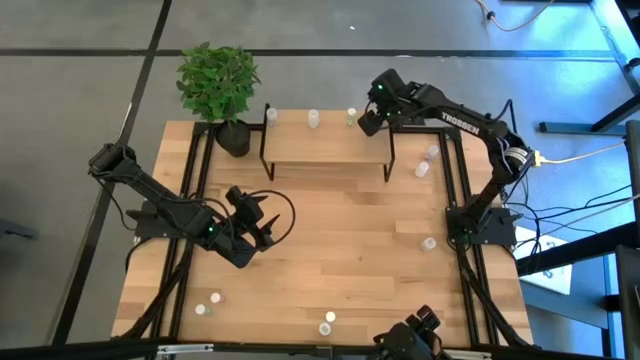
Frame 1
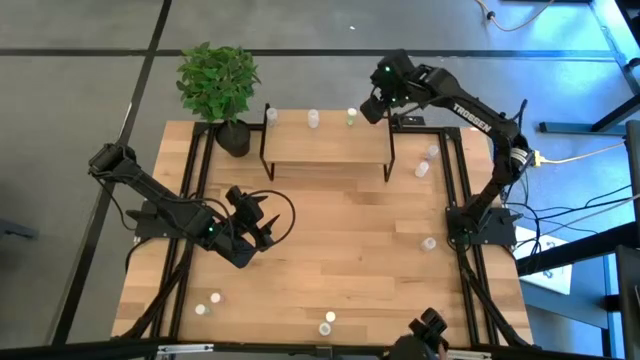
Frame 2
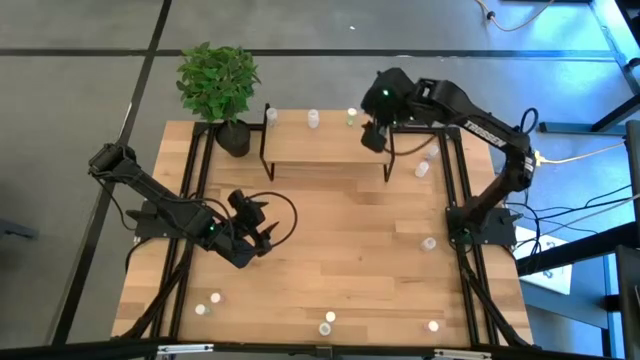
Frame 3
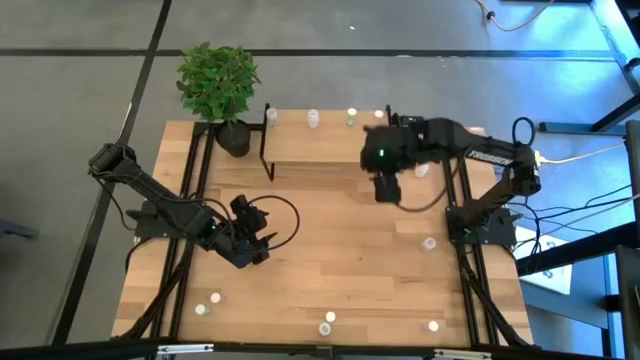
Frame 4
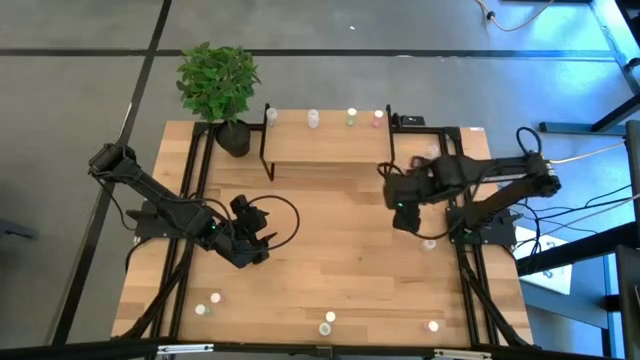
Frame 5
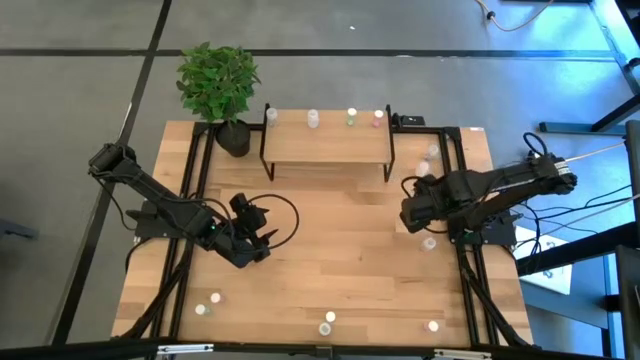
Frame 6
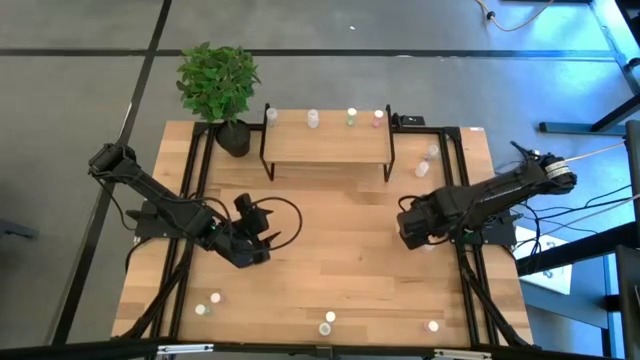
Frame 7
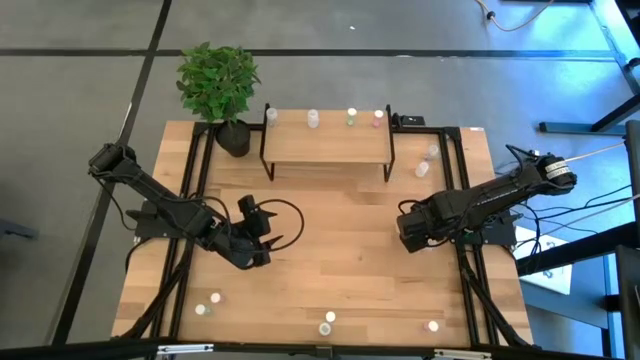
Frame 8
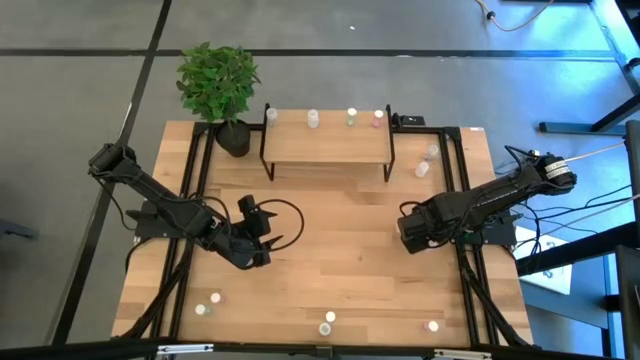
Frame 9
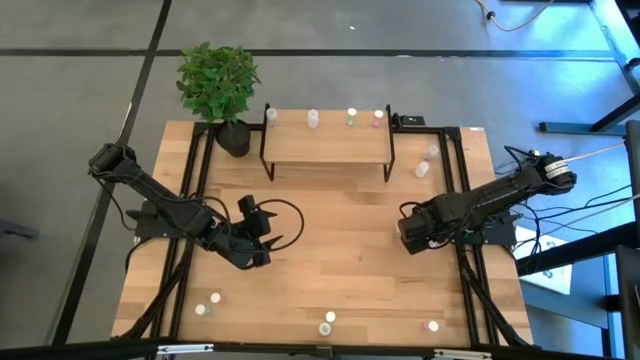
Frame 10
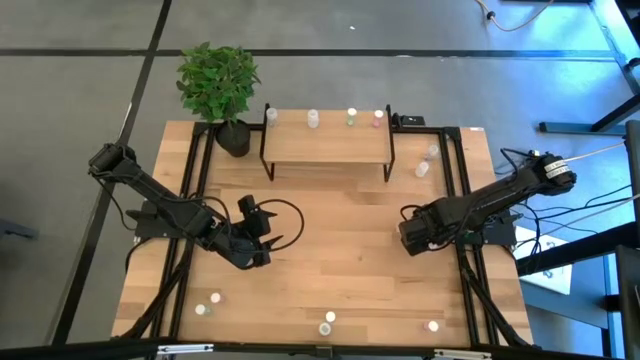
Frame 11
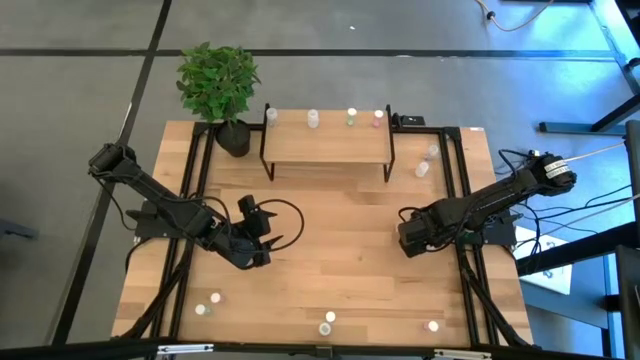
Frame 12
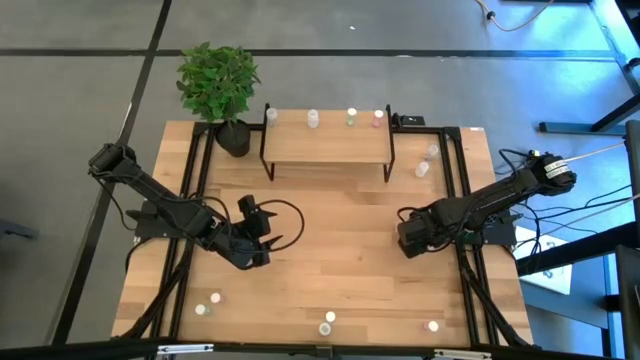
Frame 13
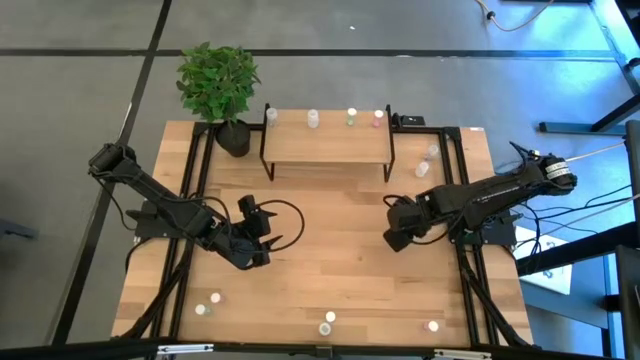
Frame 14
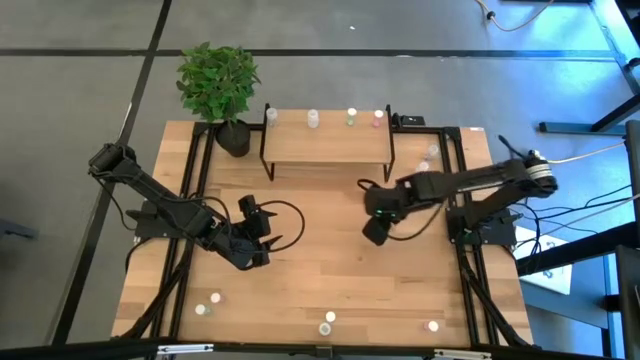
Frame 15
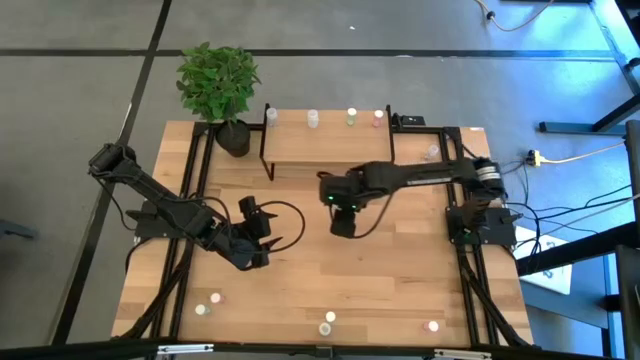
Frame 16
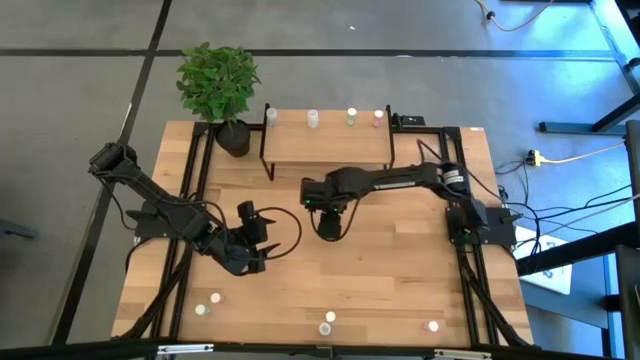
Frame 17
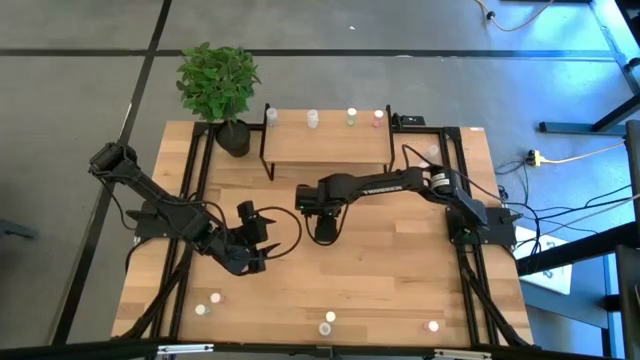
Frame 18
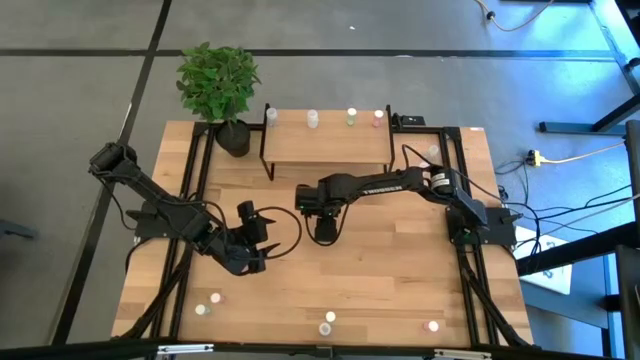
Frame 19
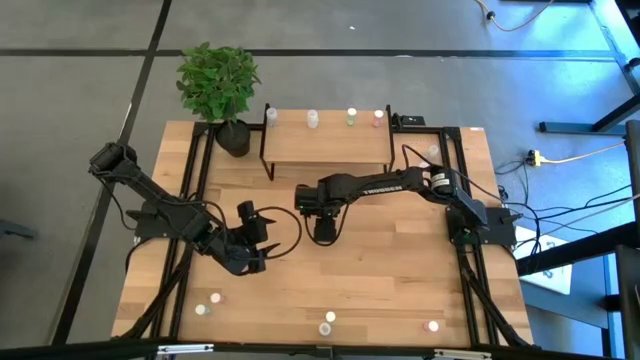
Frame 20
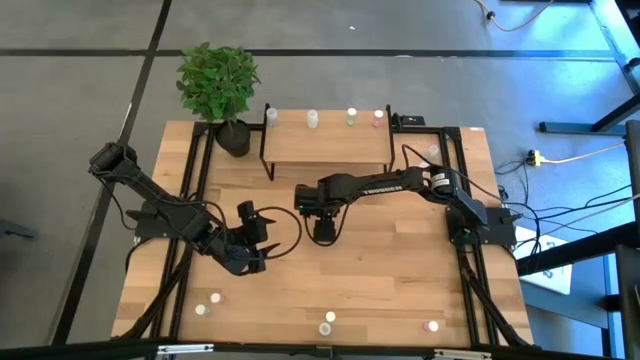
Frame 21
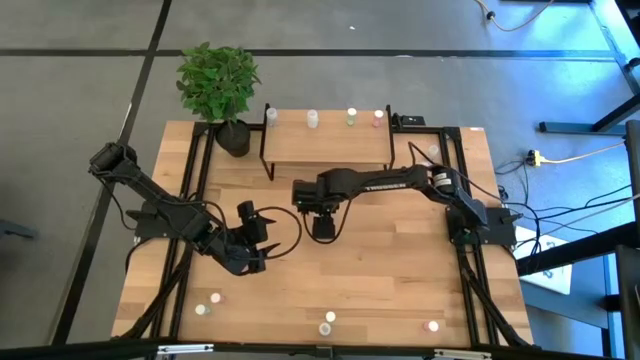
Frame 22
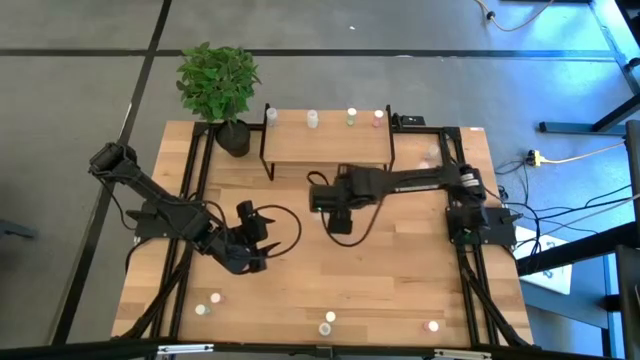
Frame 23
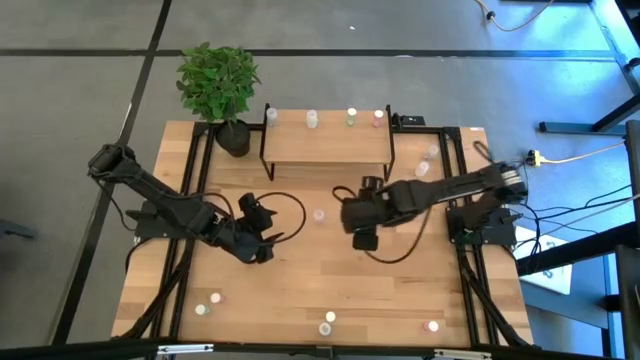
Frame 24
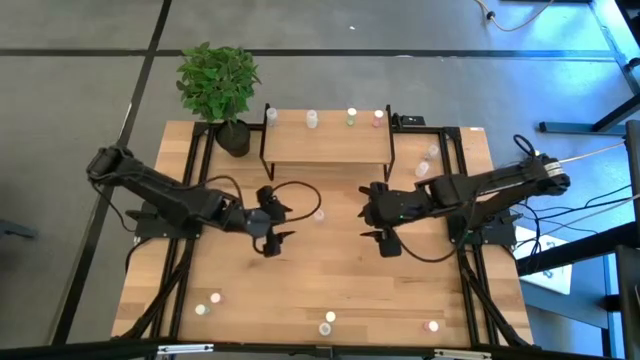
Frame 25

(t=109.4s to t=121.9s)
Task: Pick and place medicine bottles onto shelf by color
Put the middle right transparent pill bottle on the shelf aligned with the other transparent pill bottle

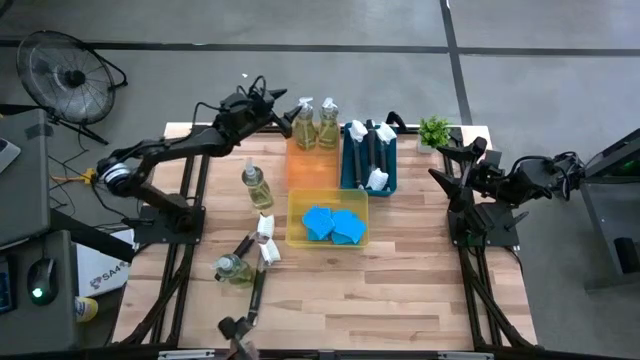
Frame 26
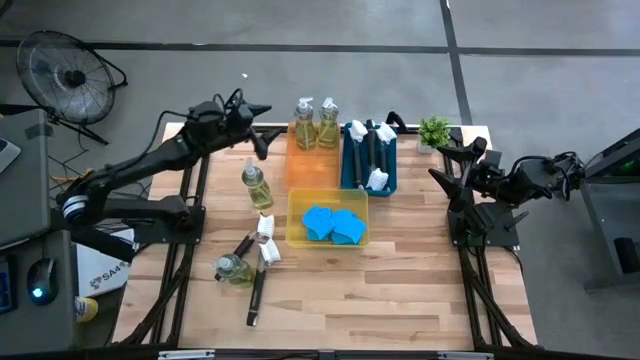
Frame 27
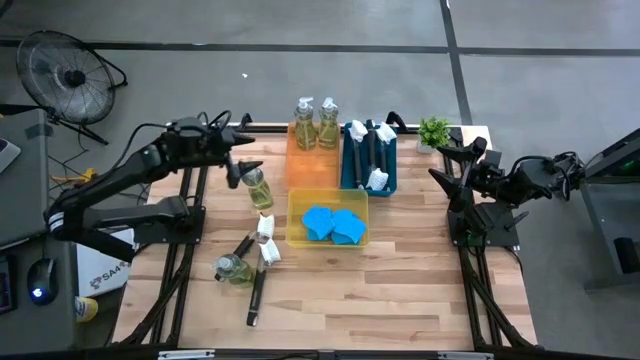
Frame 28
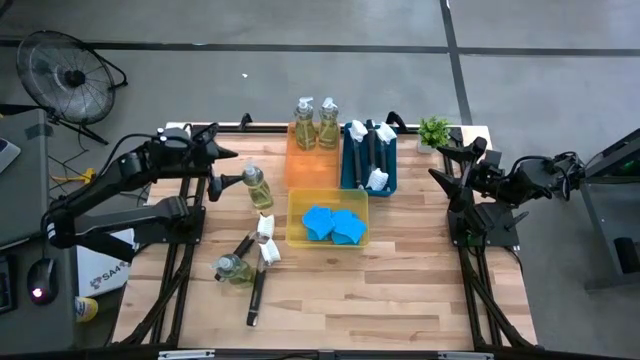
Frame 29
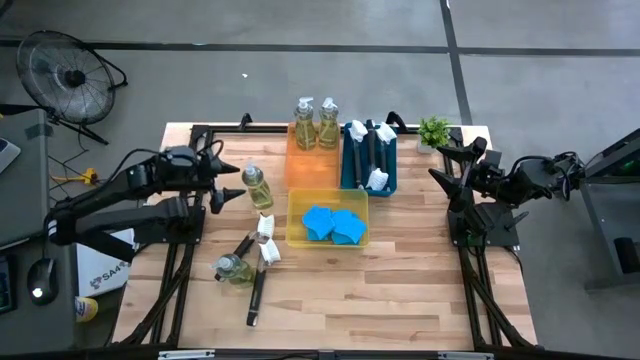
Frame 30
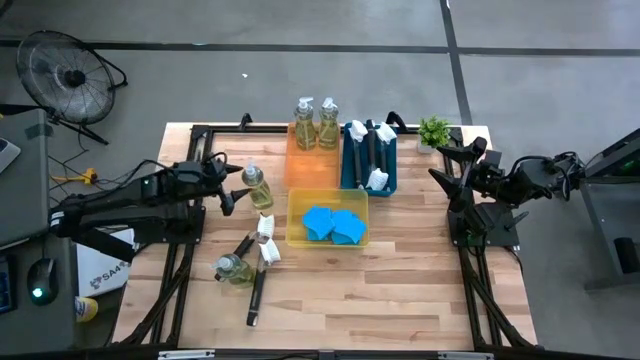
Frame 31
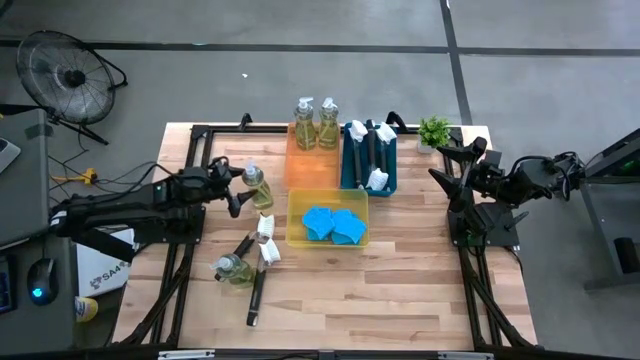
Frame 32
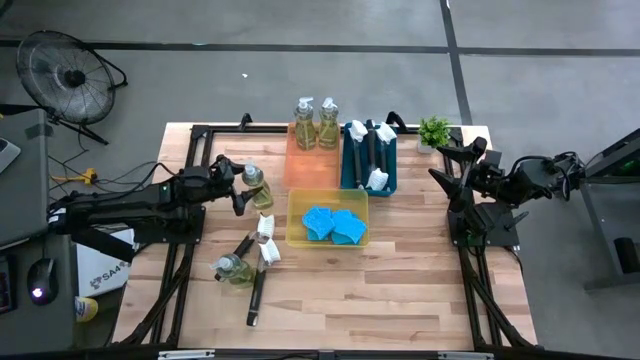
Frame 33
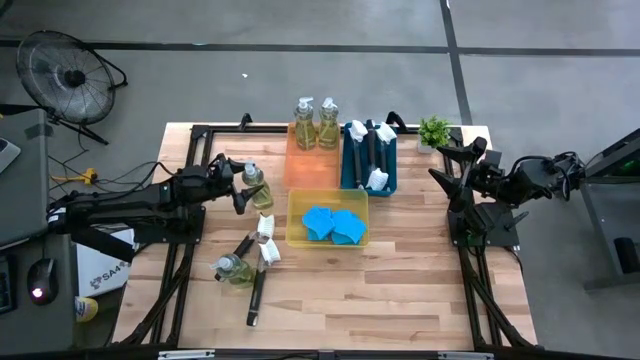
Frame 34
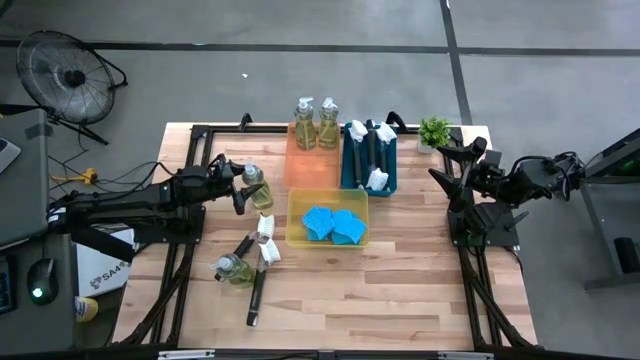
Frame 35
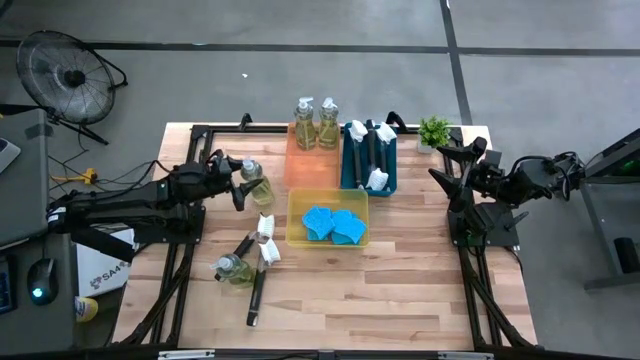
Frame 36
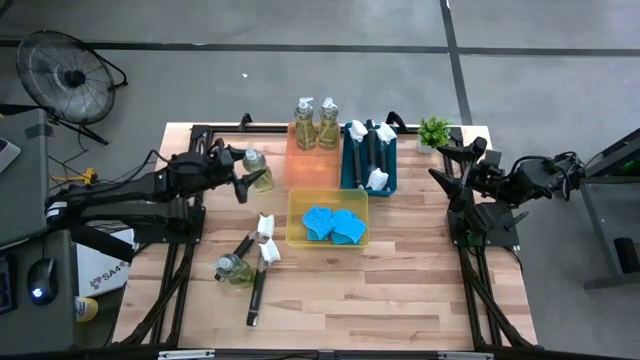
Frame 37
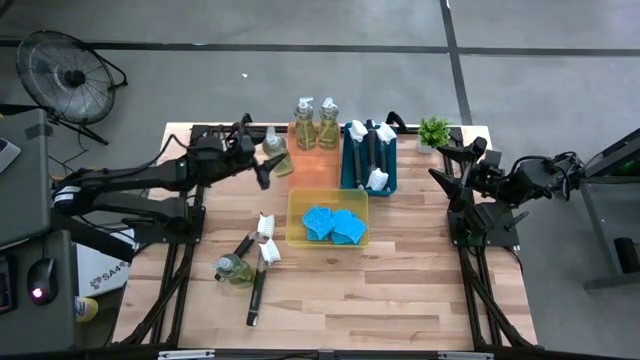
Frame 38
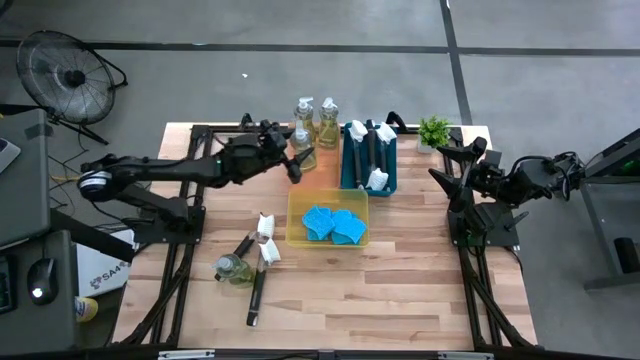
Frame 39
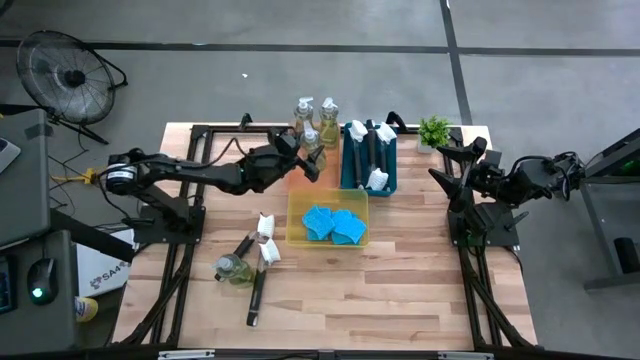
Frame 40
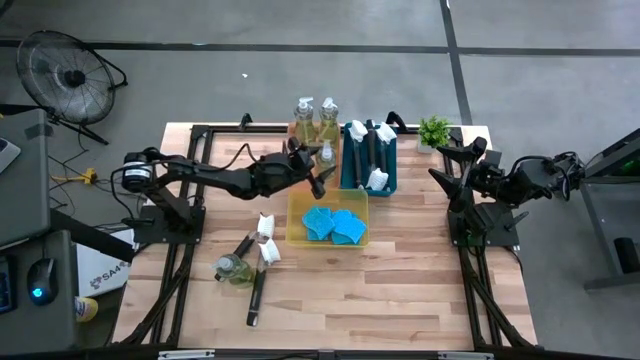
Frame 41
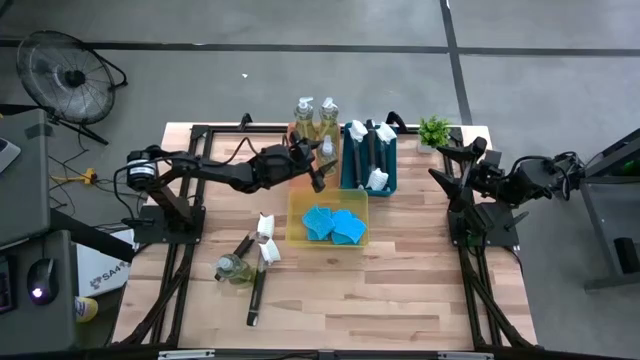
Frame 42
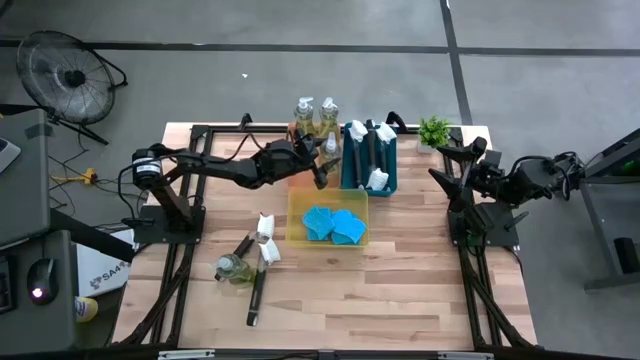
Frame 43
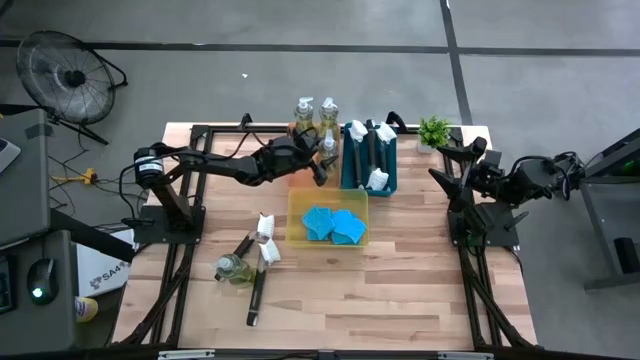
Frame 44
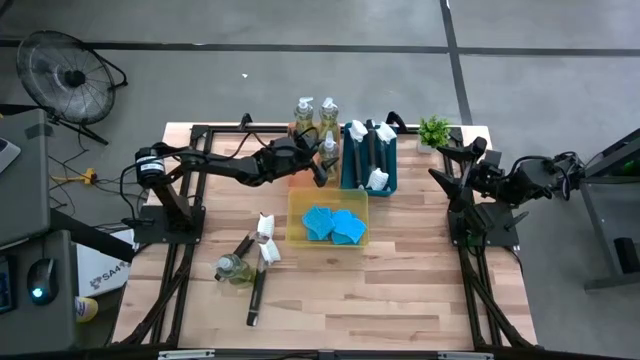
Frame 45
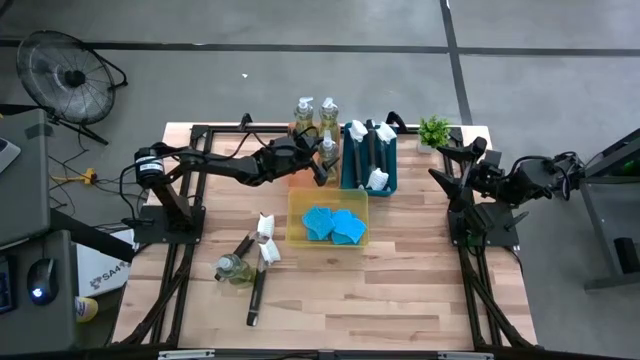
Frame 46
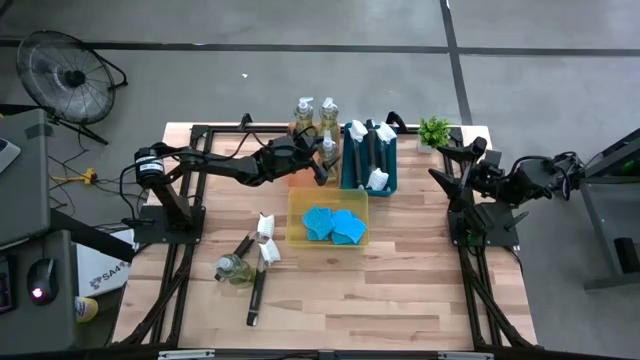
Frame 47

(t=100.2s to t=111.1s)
Task: Pick & Place Kitchen Sink Supplies
Put the dish soap into the orange bin
